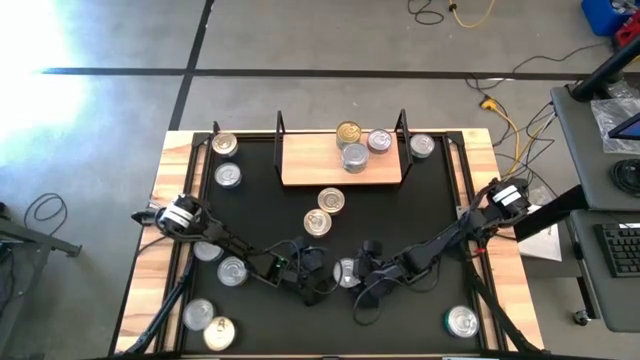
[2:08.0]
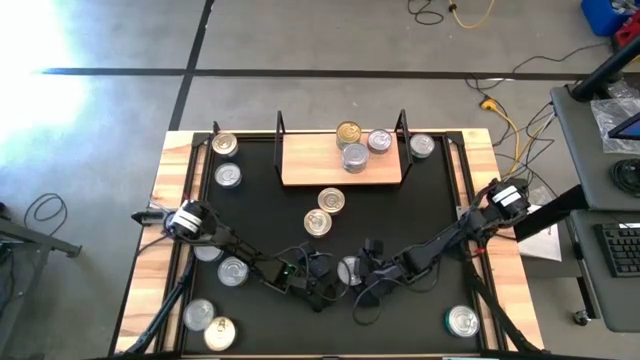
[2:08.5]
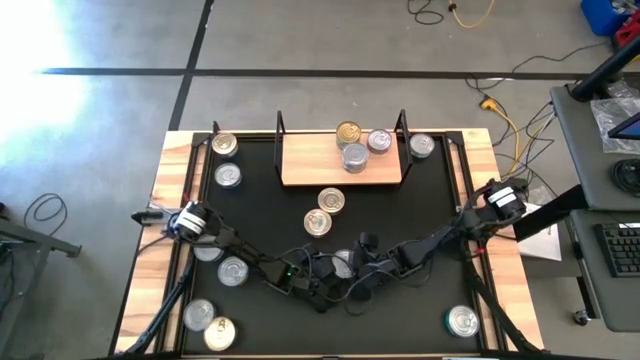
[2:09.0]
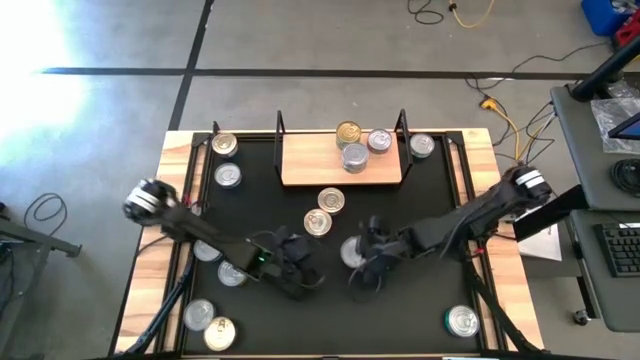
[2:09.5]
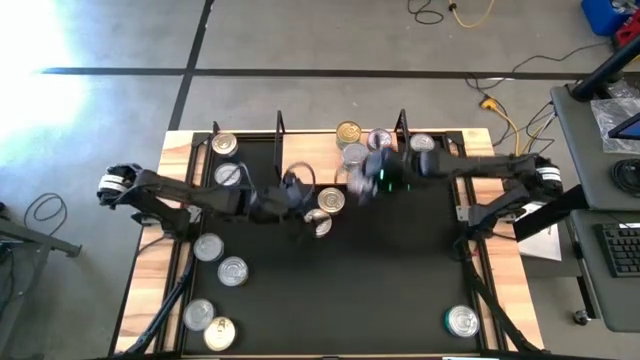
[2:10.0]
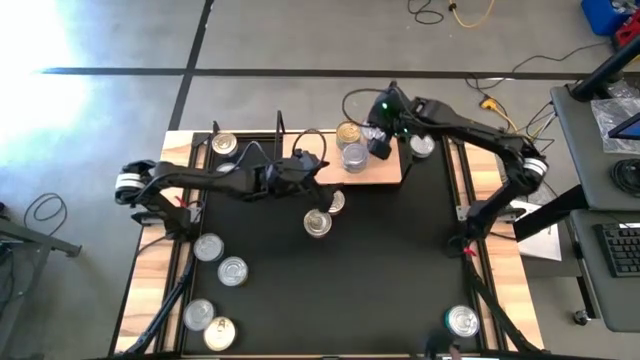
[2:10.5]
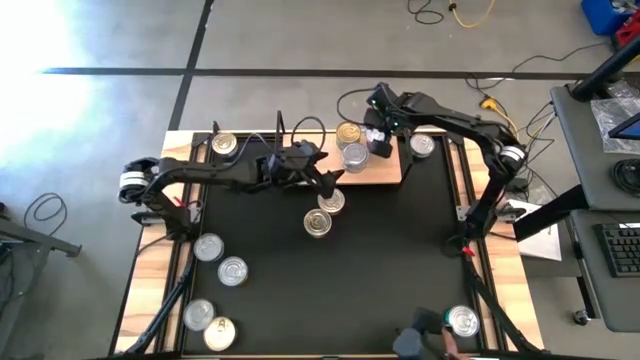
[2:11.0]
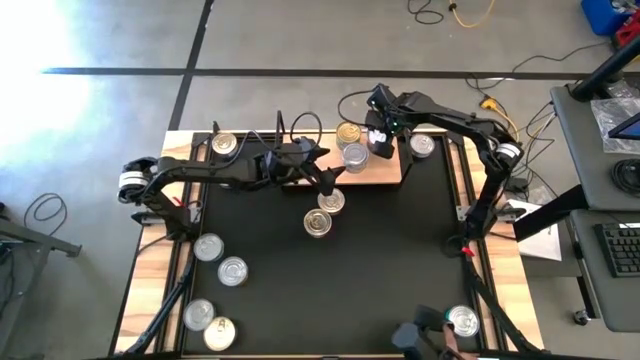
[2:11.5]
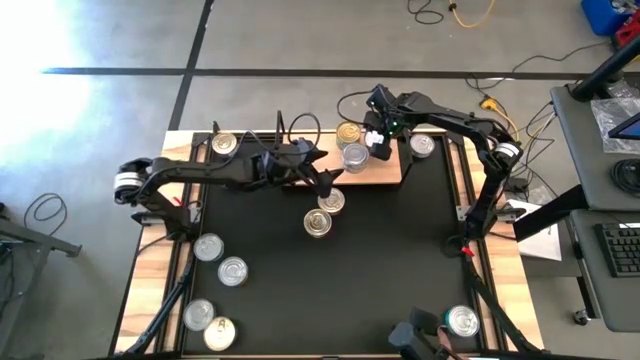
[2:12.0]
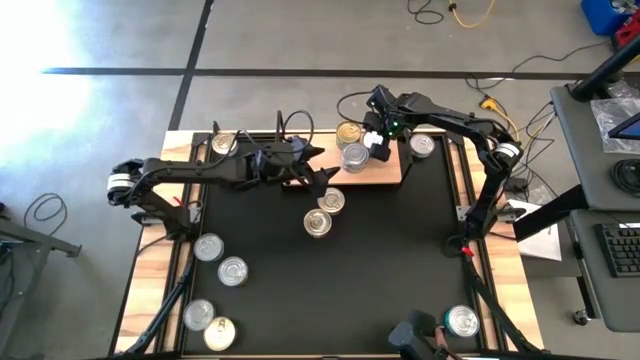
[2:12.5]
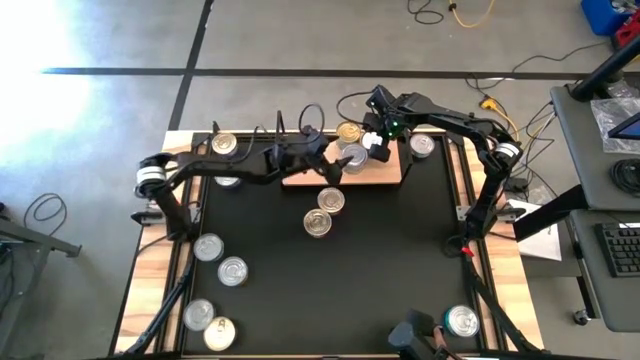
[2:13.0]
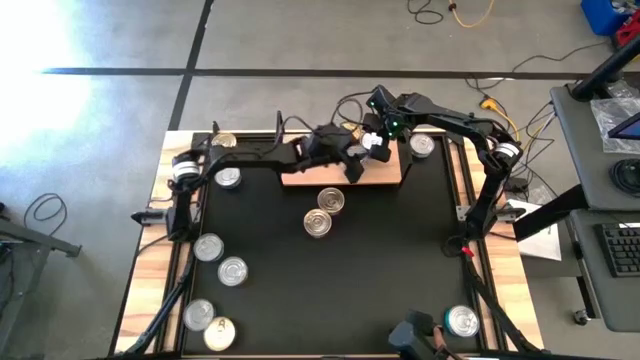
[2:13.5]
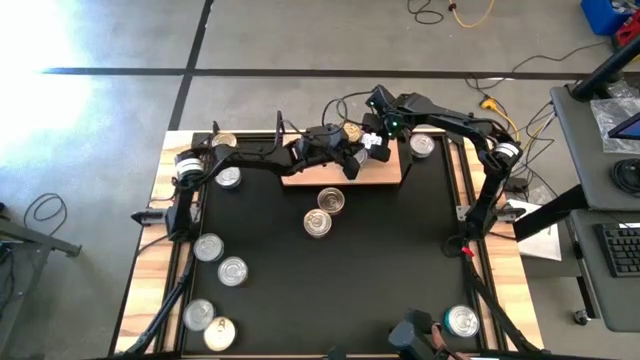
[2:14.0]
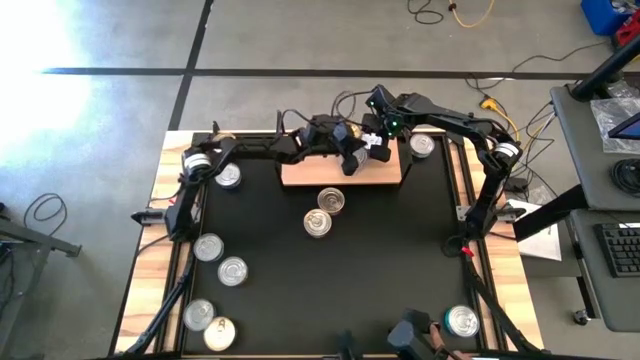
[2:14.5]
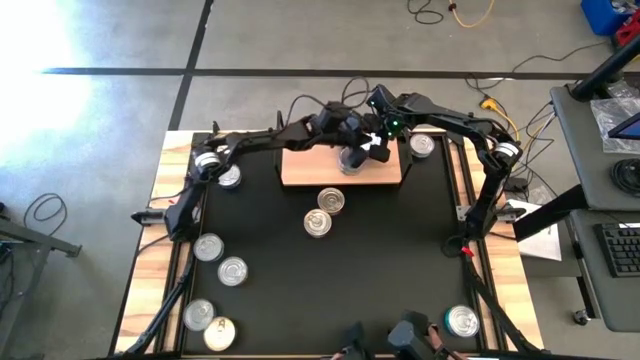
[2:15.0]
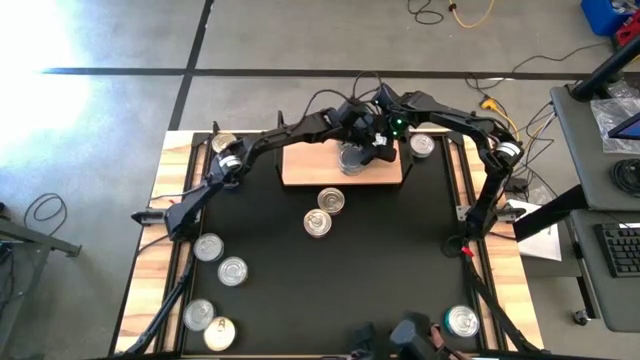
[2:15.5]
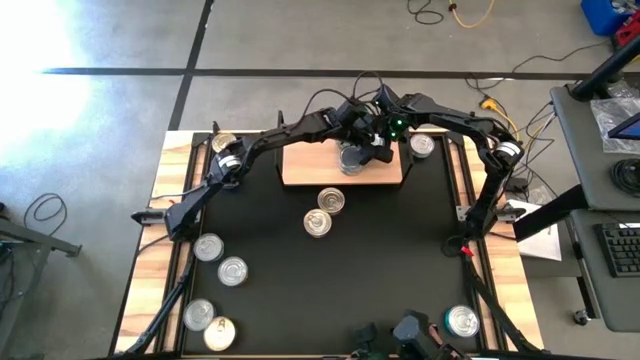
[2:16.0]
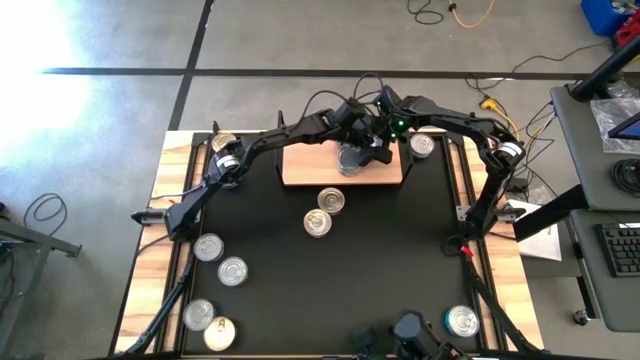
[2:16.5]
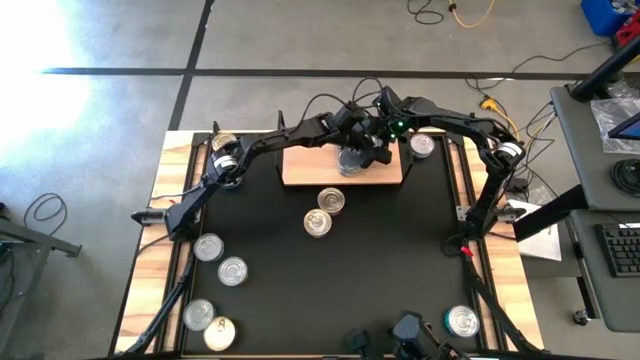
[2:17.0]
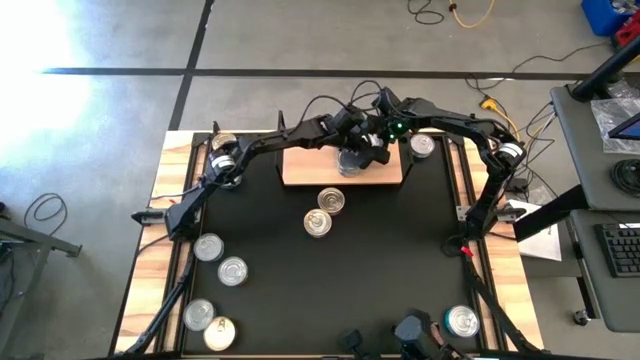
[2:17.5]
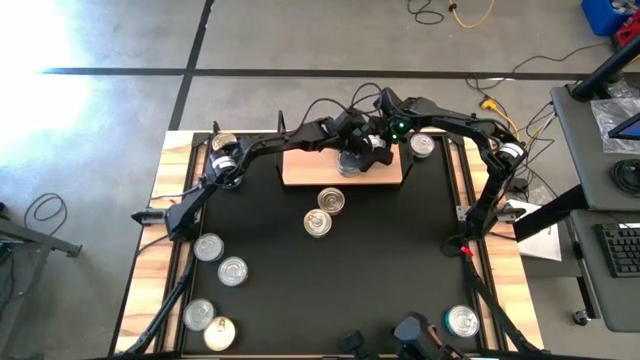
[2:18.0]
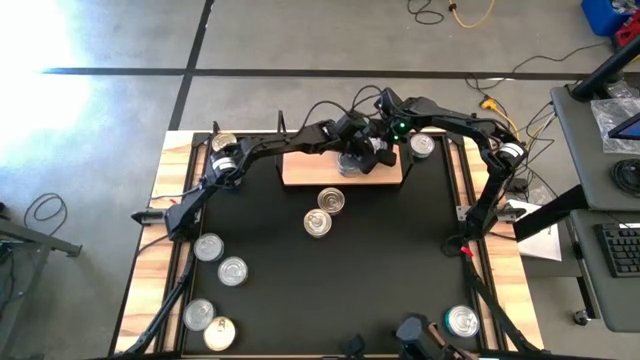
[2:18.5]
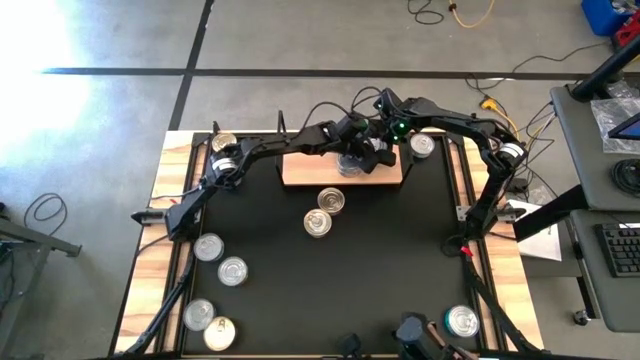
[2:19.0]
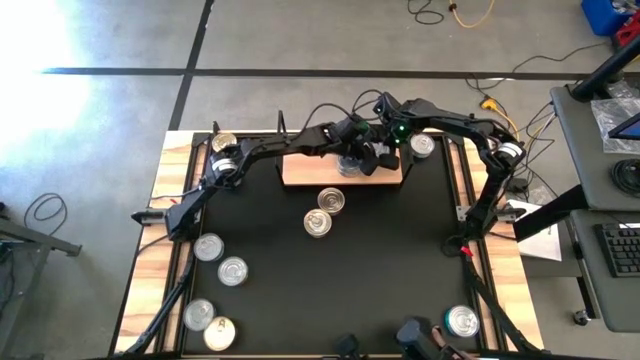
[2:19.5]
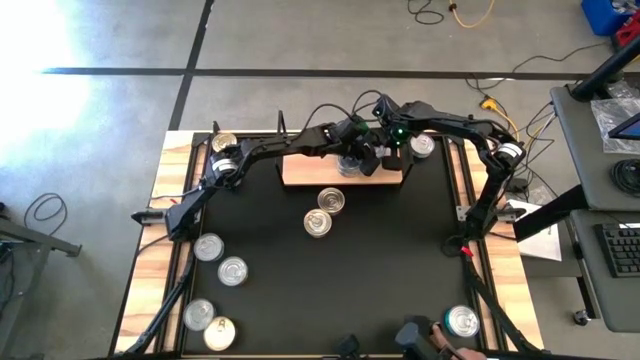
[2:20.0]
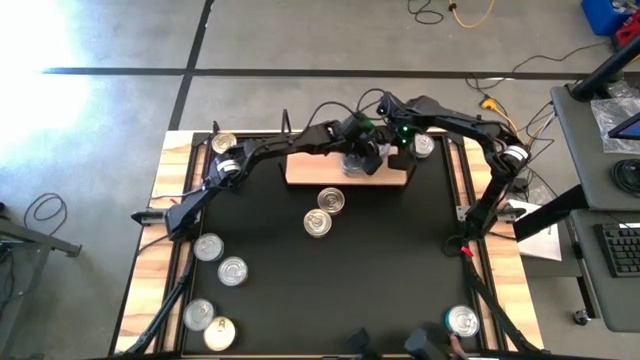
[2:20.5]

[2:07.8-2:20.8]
Task: Stack canned seafood by type on shelf
Stack the red tuna can on top of the other red tuna can on the shelf

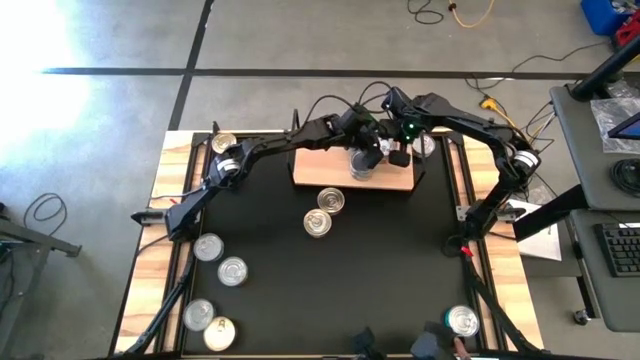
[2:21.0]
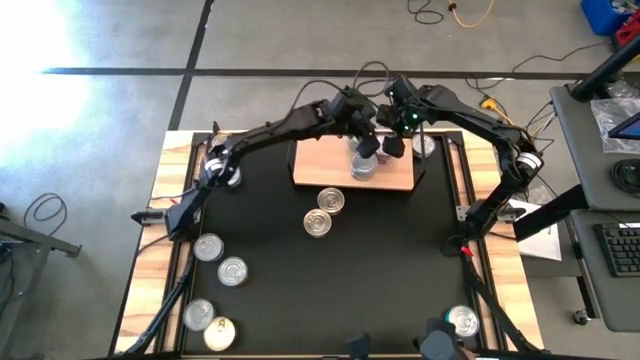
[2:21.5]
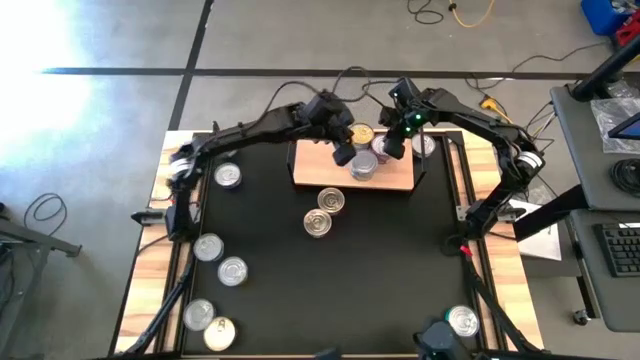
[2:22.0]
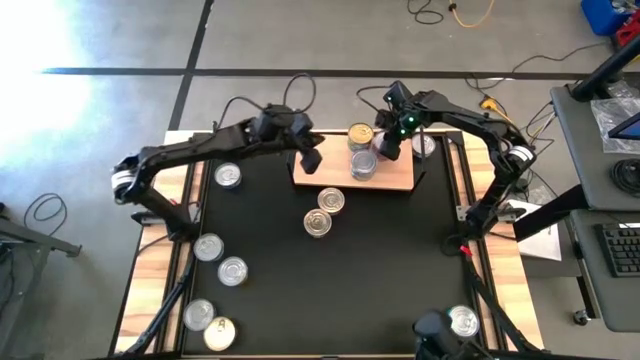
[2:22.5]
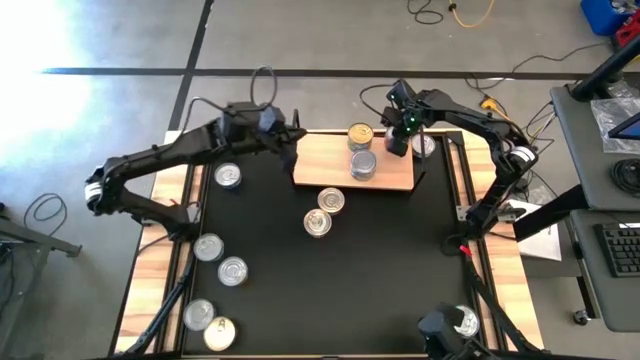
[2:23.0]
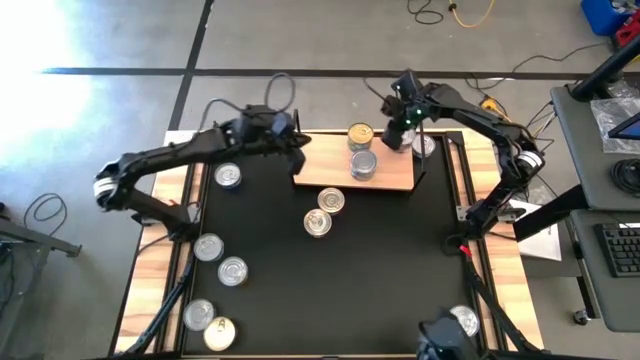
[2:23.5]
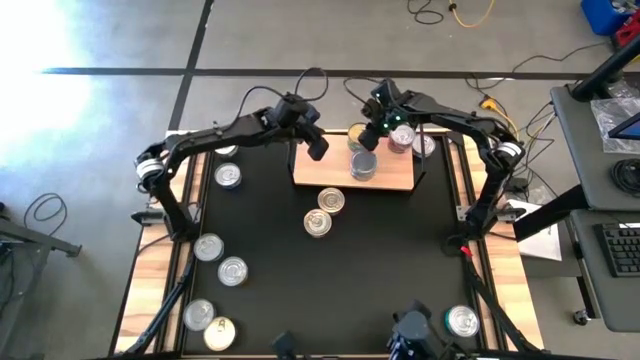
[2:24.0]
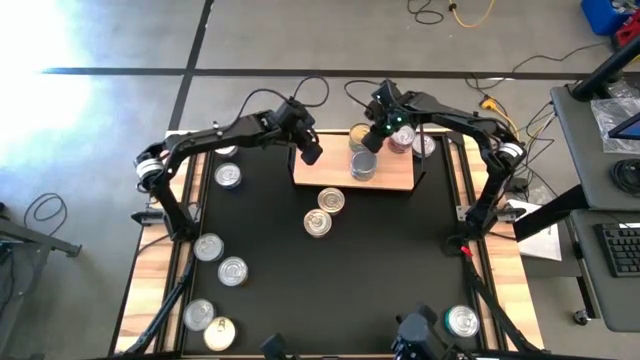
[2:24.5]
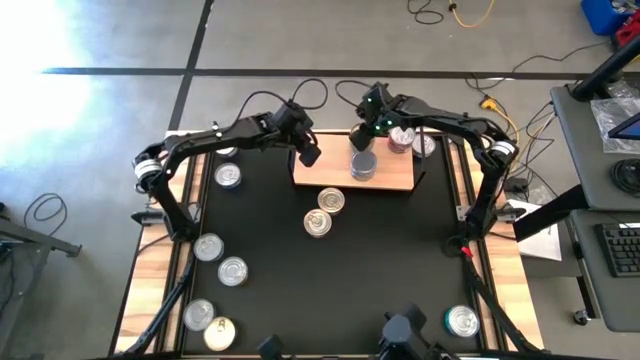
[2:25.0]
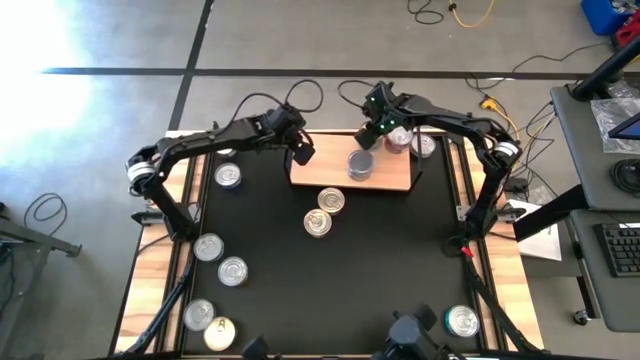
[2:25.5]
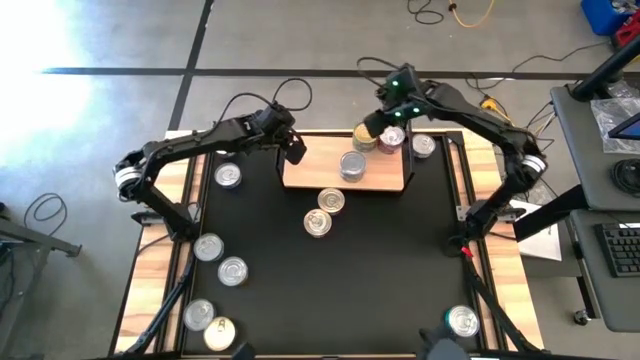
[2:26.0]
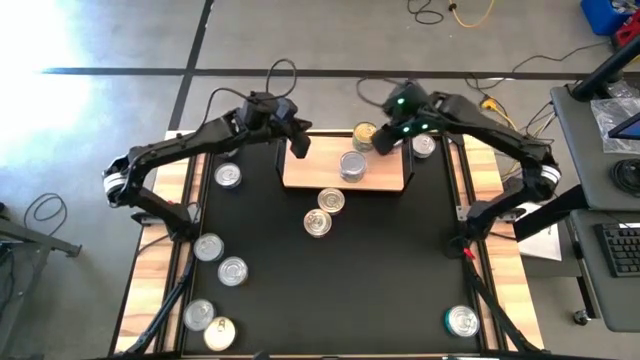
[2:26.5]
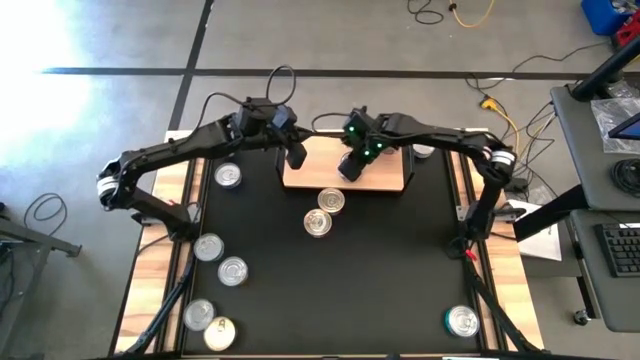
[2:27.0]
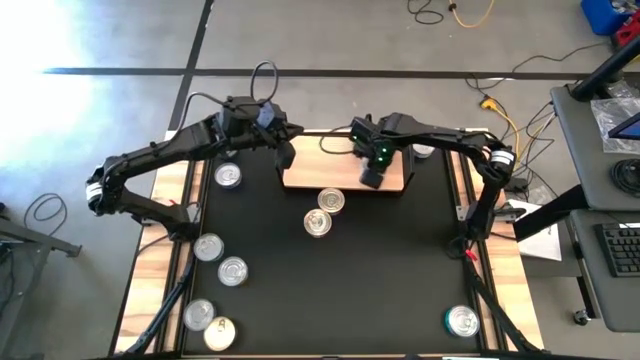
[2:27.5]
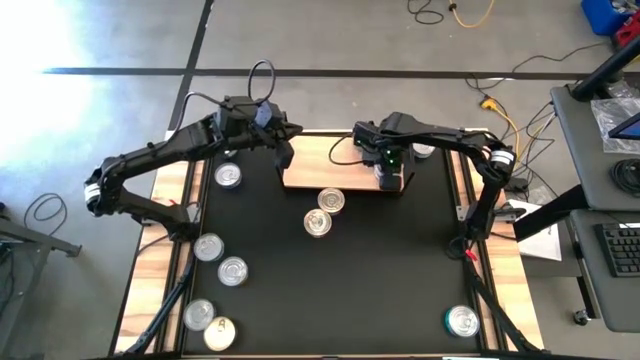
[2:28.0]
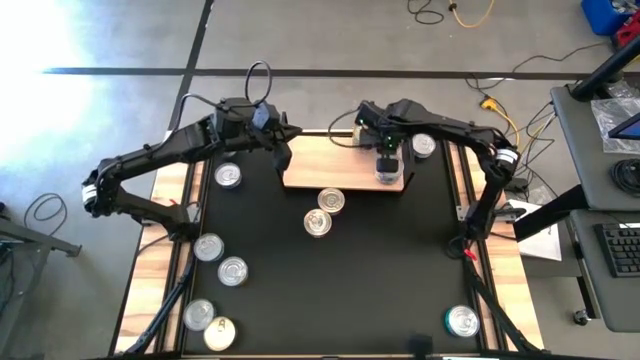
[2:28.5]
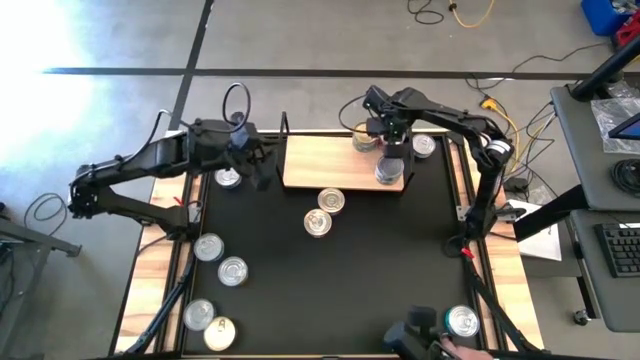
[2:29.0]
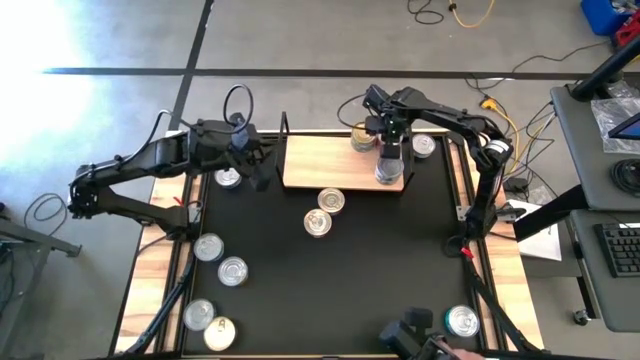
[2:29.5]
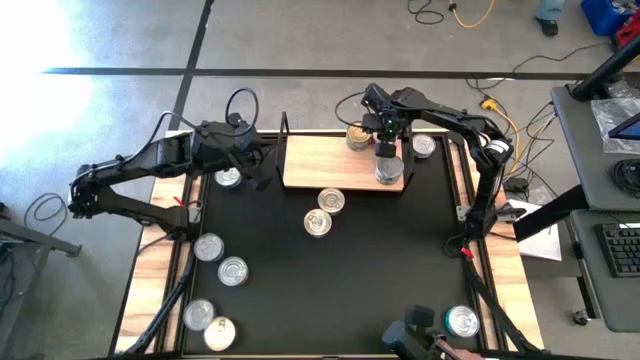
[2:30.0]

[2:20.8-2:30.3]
Adjust the tuna cans on the shelf
